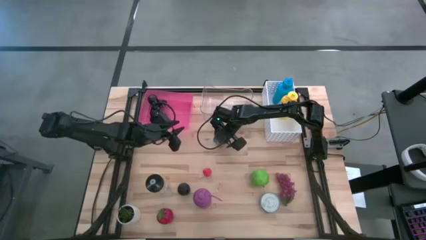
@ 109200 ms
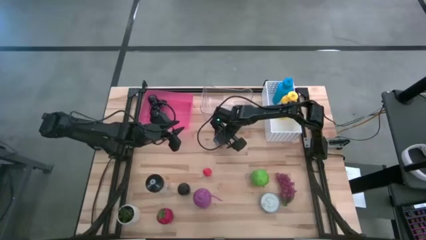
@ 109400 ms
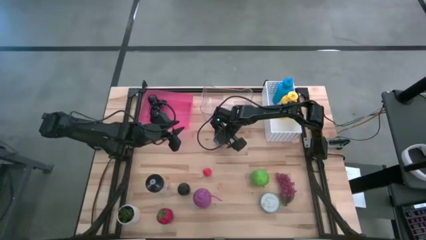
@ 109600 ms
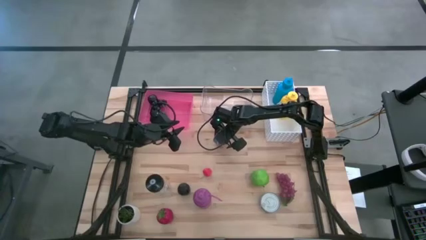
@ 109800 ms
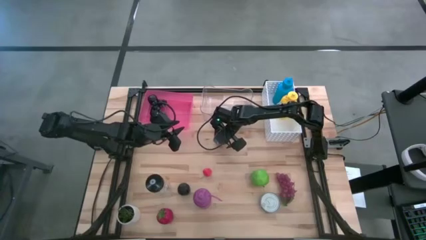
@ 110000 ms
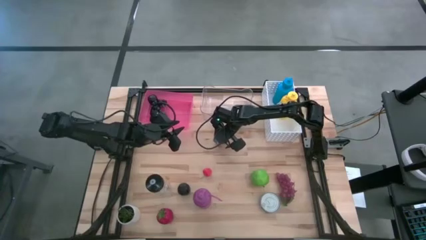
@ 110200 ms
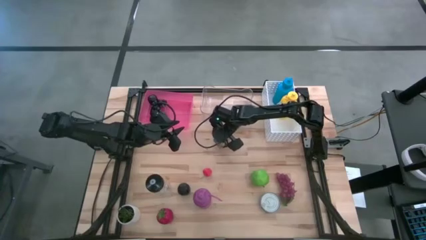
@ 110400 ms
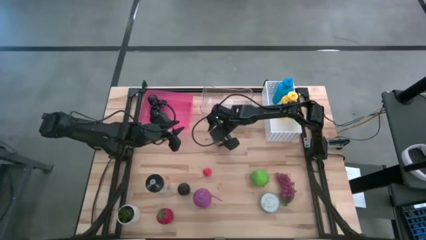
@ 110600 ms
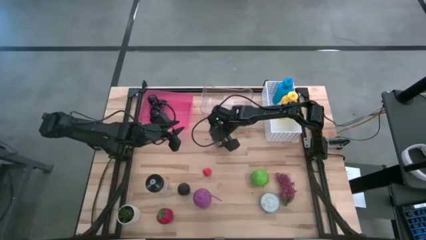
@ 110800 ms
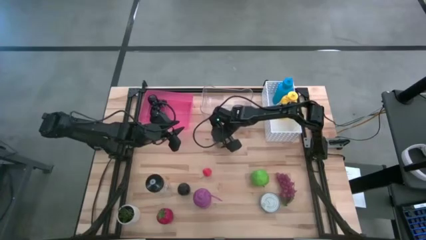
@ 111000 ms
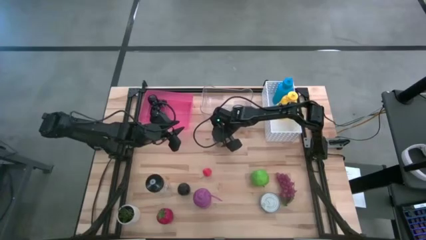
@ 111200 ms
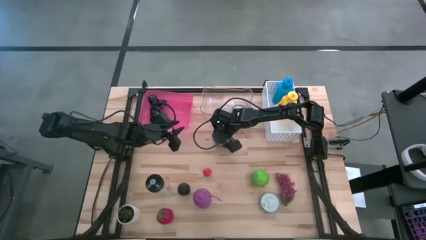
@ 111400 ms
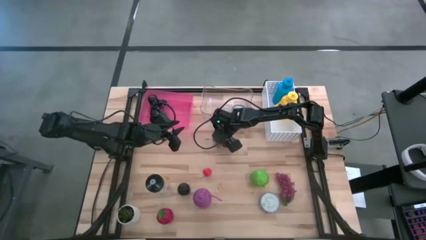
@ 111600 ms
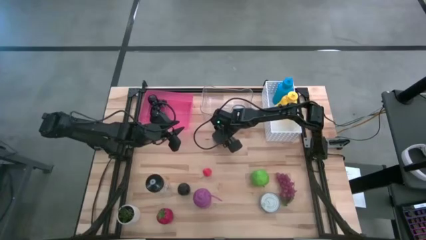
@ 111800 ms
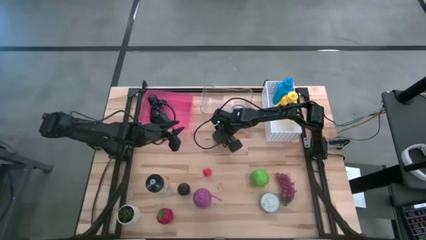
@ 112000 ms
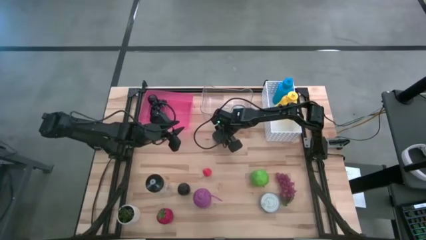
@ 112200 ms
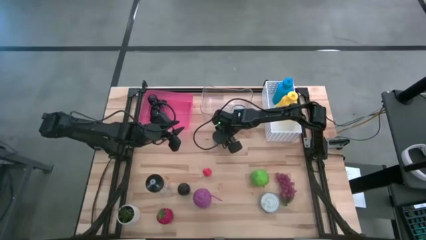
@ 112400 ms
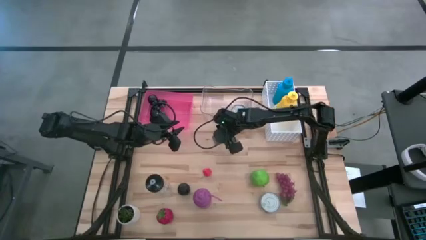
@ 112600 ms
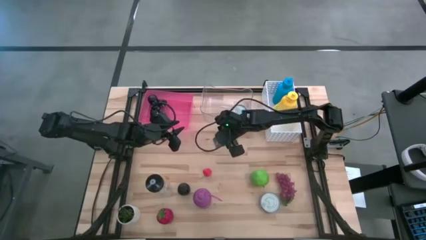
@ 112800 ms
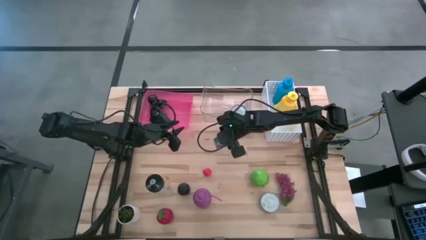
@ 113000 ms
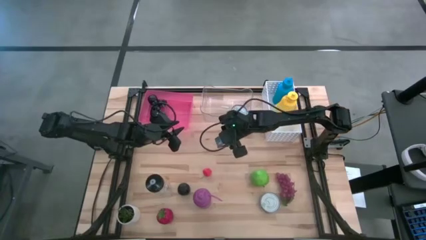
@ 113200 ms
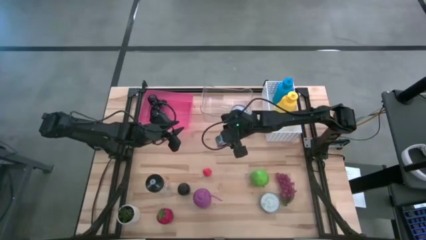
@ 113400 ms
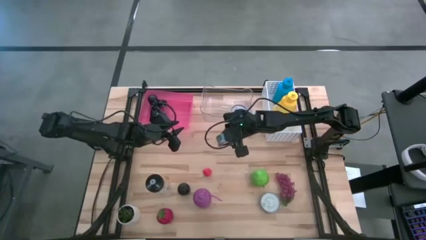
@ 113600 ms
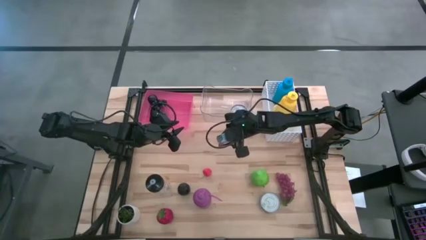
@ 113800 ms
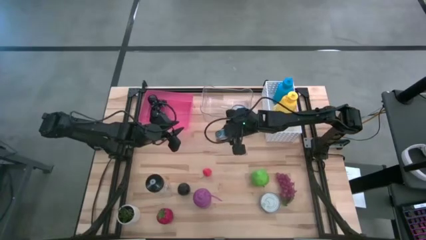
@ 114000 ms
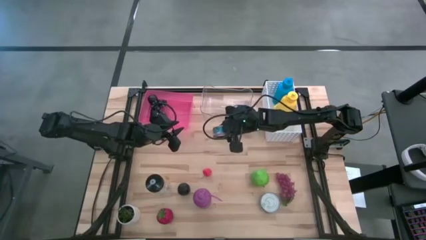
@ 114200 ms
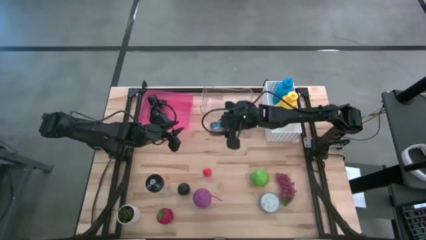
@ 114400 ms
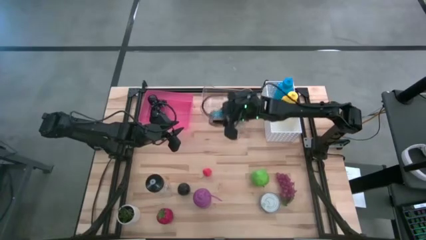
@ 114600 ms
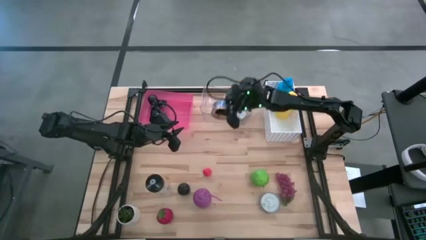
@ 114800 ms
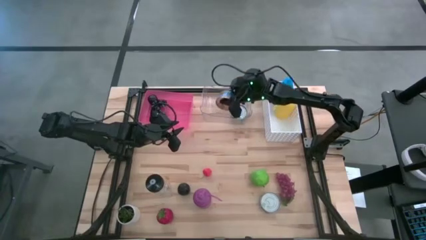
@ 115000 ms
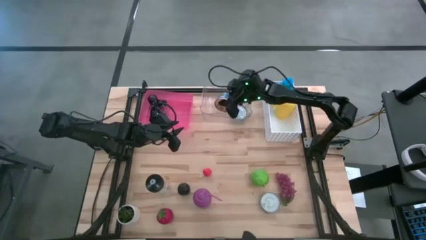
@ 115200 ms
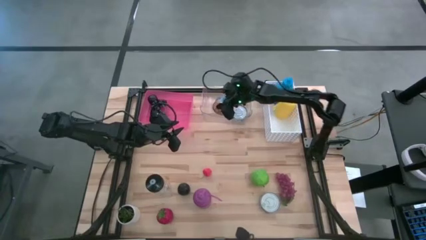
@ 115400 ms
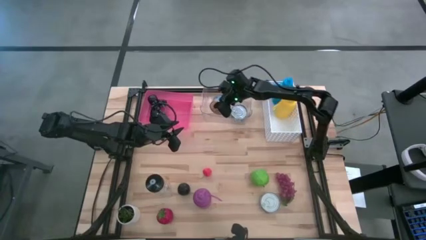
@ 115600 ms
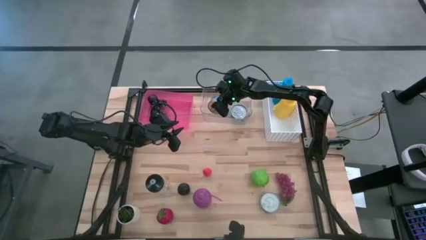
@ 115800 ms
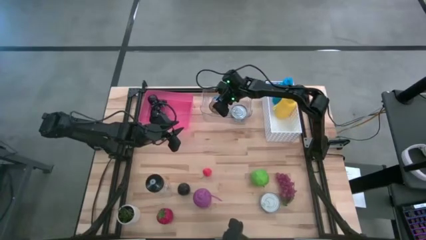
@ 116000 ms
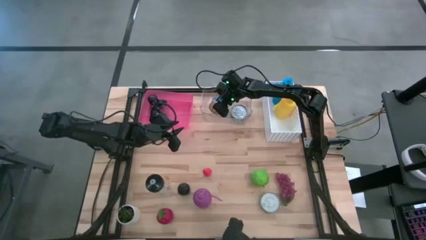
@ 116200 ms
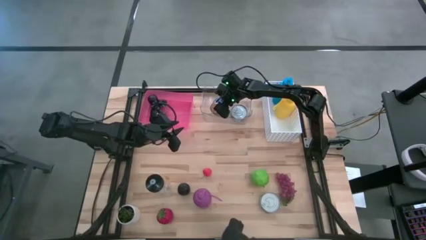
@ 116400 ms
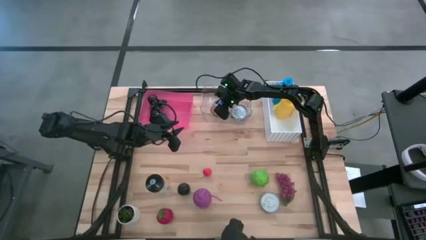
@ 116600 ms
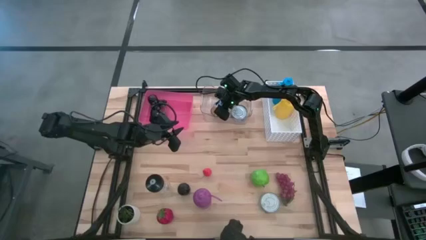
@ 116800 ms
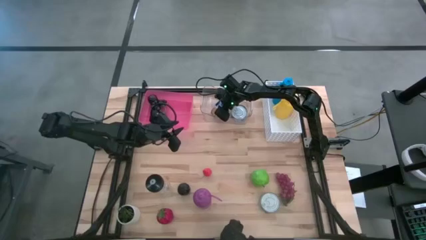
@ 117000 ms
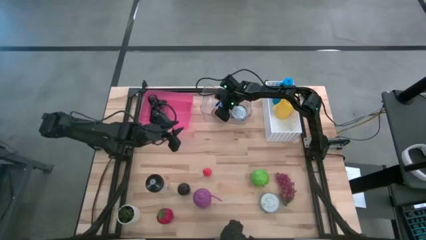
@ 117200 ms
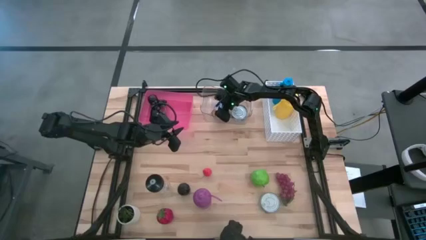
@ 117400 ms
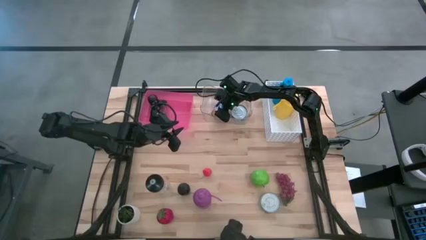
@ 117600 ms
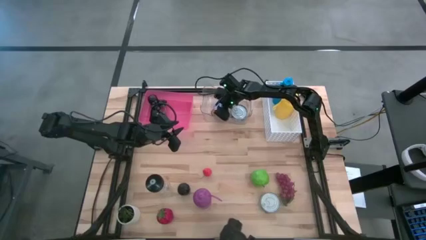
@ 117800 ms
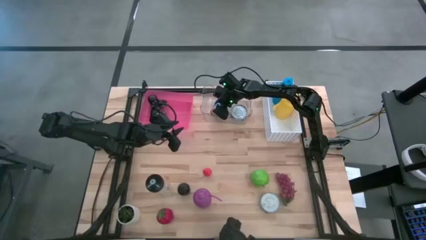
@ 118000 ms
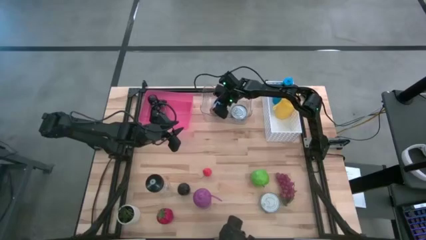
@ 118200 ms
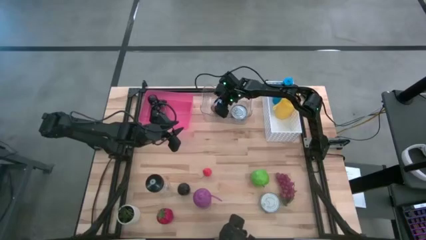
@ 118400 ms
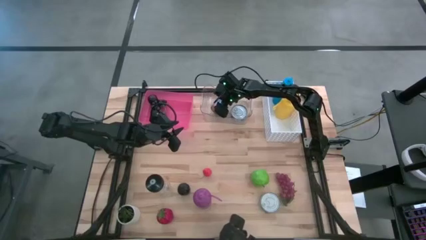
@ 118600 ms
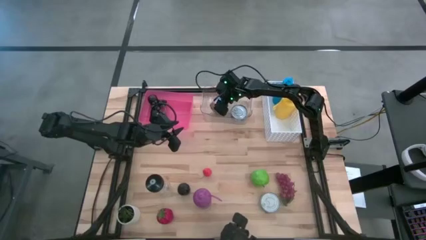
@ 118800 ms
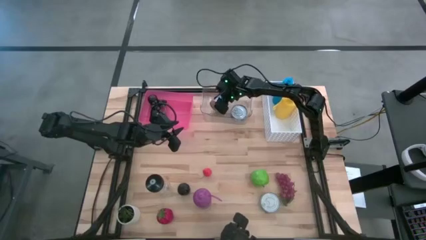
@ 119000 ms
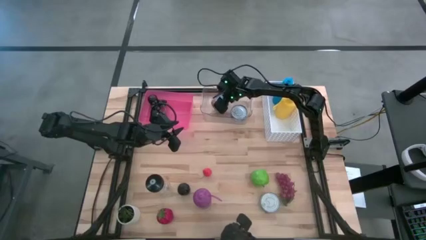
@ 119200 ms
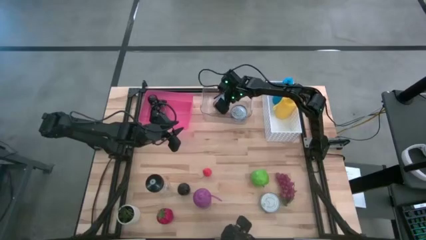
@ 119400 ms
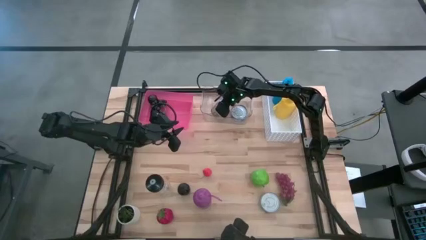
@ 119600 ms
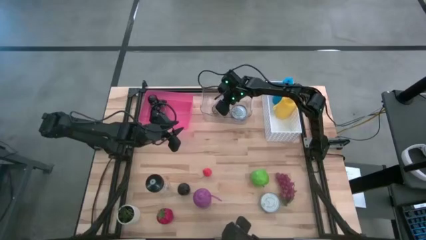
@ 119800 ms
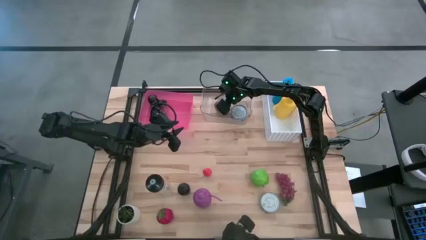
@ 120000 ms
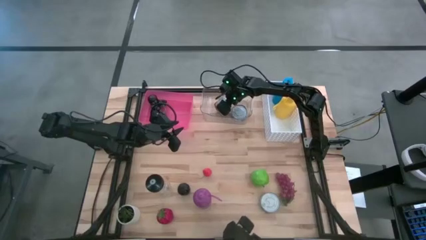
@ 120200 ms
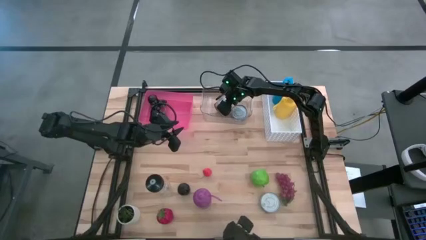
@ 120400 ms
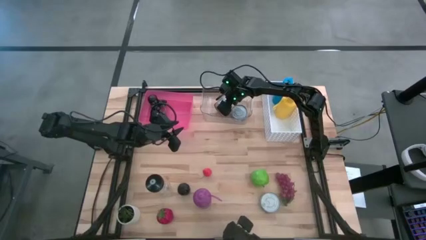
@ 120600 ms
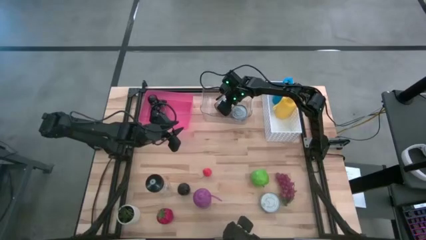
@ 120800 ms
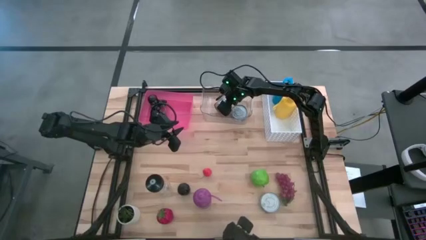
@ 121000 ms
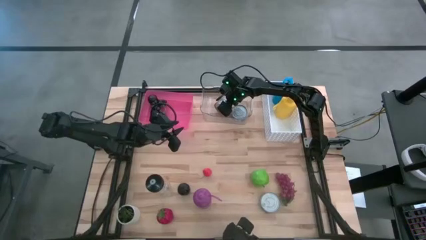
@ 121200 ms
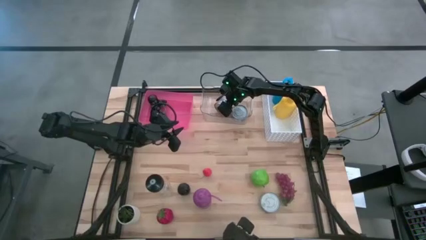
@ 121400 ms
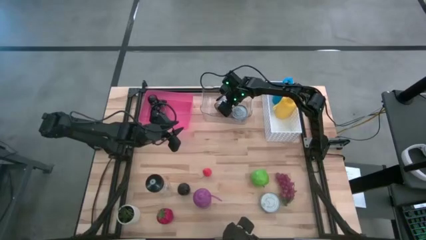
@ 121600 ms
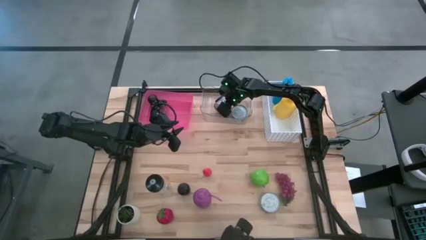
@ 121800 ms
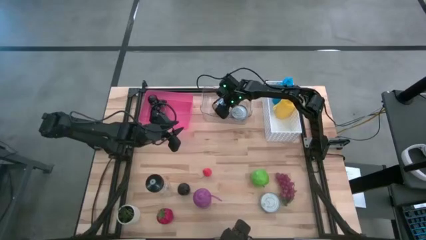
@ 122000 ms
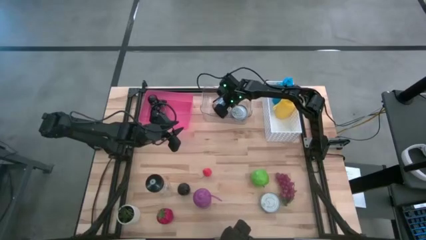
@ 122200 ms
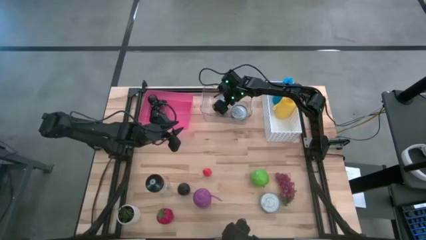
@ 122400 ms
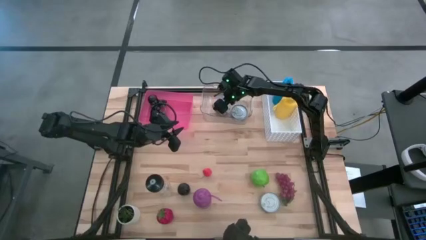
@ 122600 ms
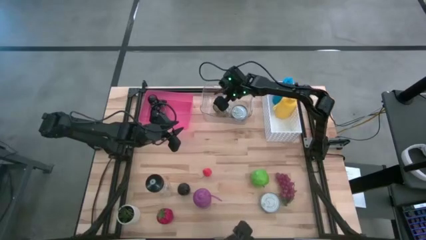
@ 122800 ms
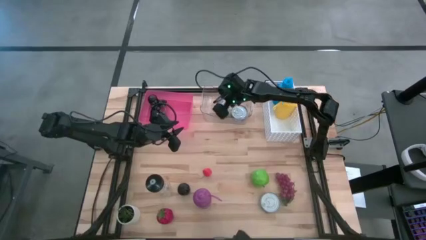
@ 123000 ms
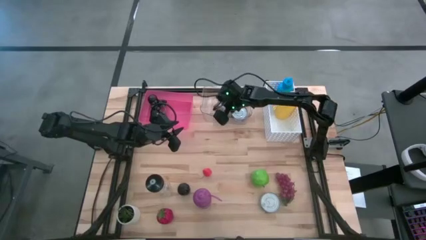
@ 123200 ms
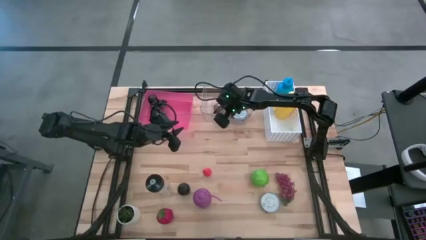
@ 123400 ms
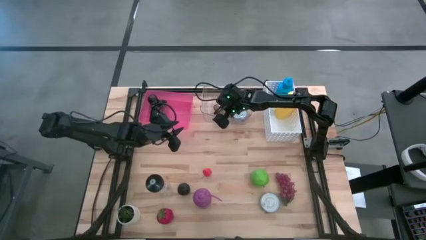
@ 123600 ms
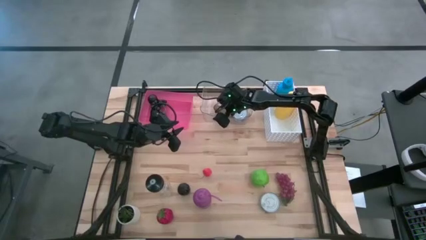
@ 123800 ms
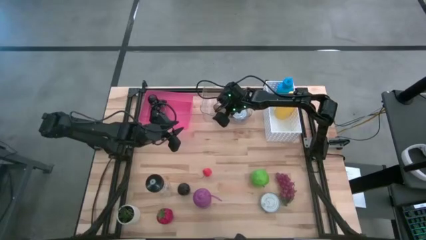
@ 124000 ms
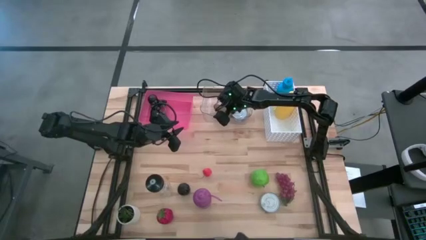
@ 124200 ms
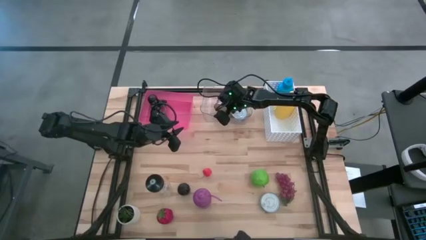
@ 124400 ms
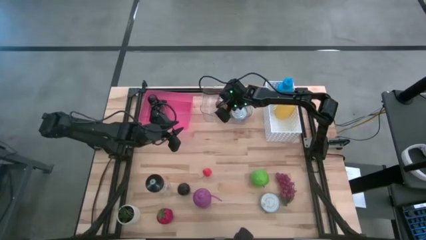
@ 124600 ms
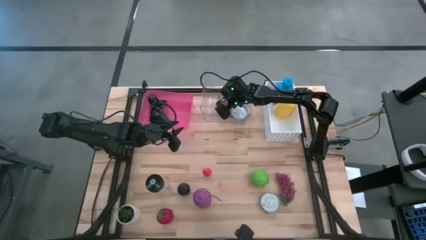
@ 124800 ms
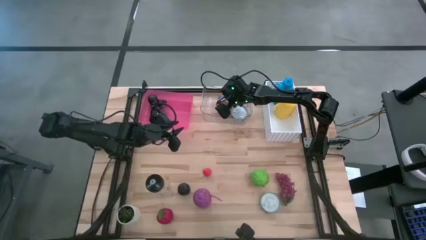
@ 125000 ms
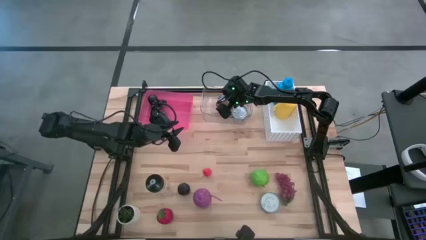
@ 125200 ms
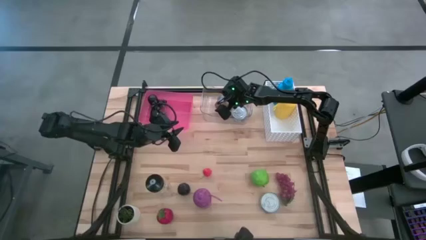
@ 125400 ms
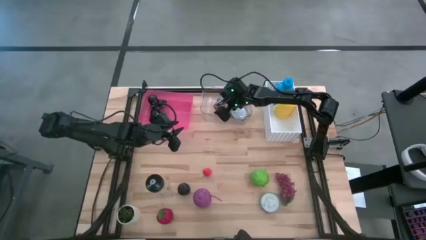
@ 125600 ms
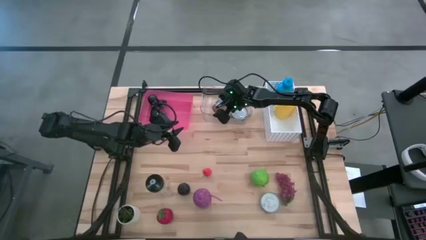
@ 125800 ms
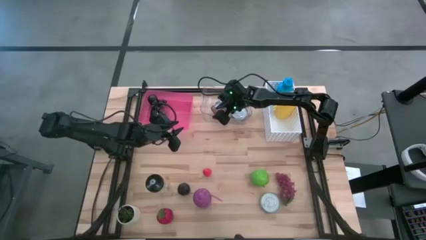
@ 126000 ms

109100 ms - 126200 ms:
Task: Pick & Place Food Item
Put the blue red tuna can into the transparent bin
